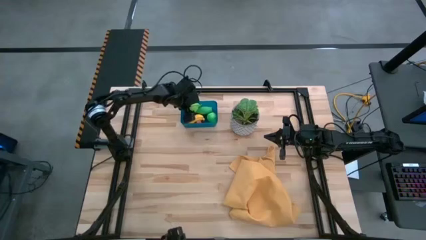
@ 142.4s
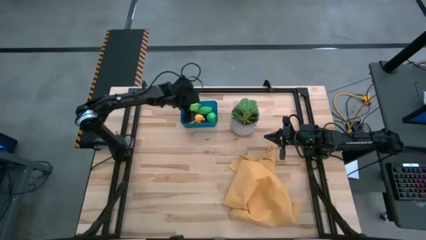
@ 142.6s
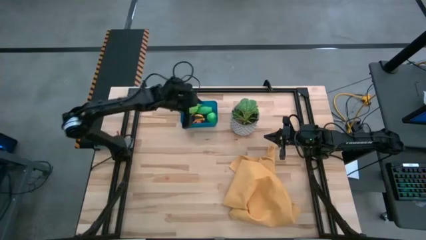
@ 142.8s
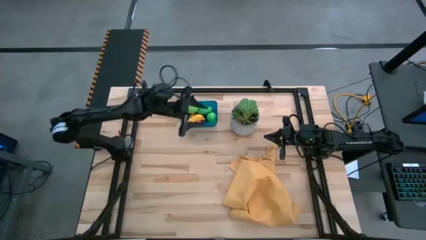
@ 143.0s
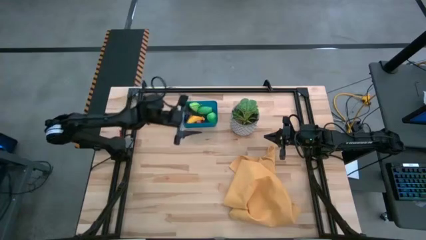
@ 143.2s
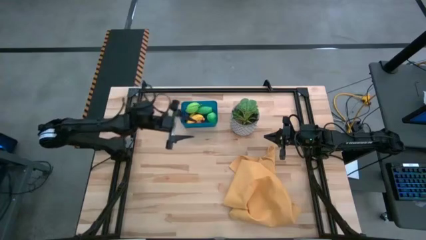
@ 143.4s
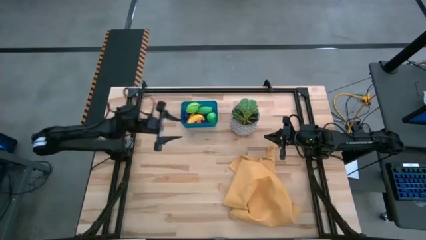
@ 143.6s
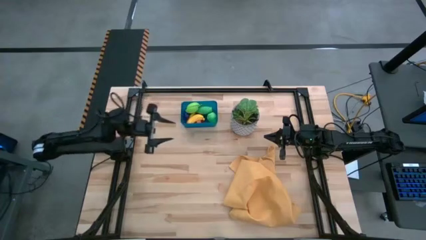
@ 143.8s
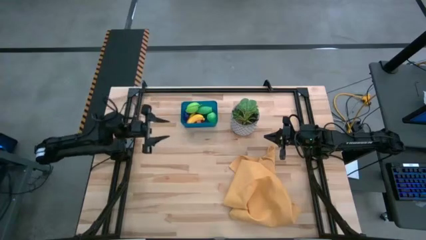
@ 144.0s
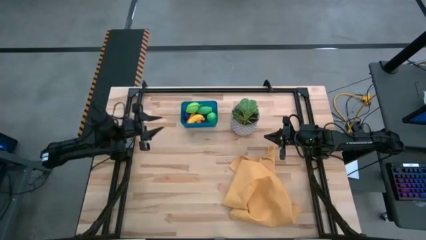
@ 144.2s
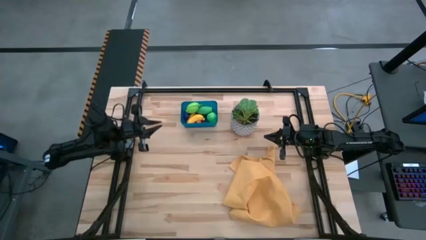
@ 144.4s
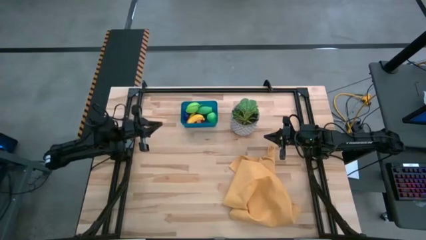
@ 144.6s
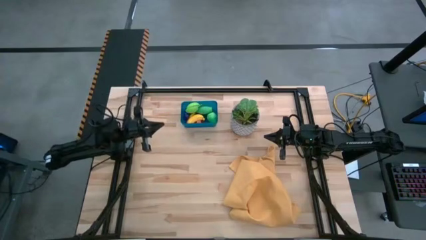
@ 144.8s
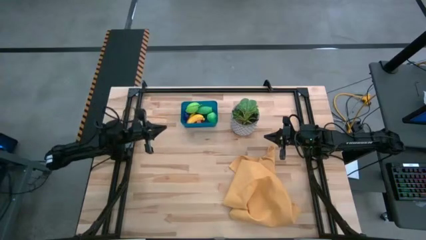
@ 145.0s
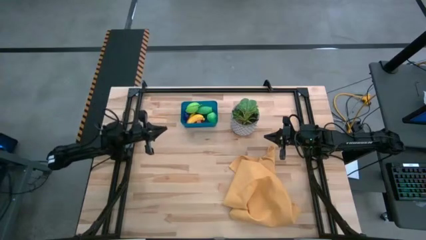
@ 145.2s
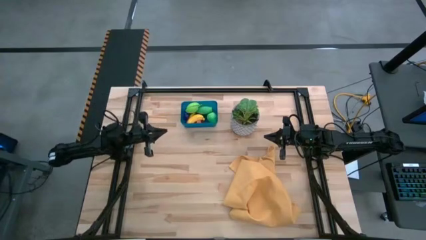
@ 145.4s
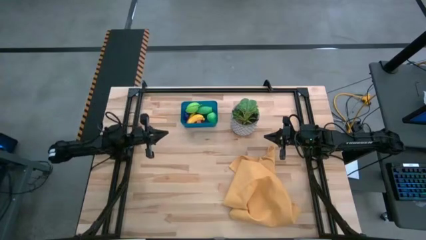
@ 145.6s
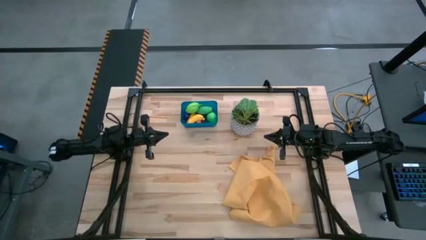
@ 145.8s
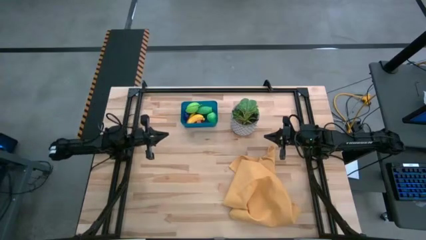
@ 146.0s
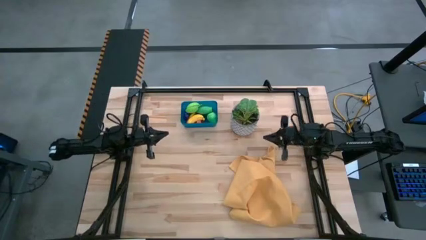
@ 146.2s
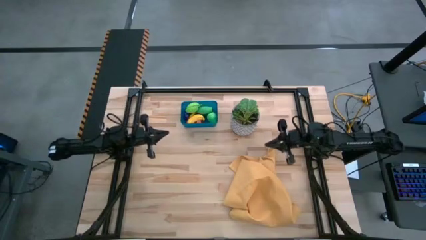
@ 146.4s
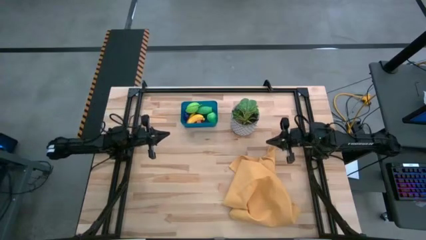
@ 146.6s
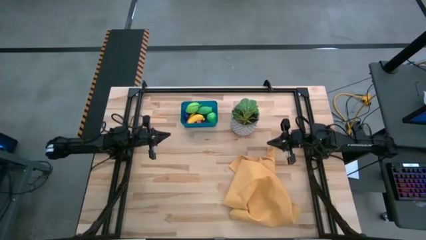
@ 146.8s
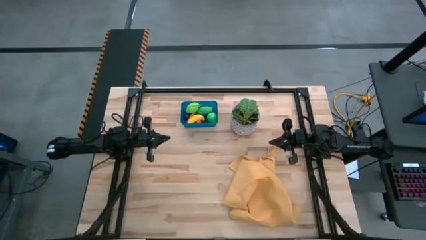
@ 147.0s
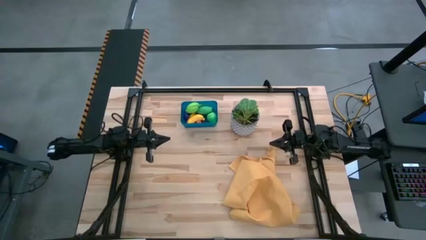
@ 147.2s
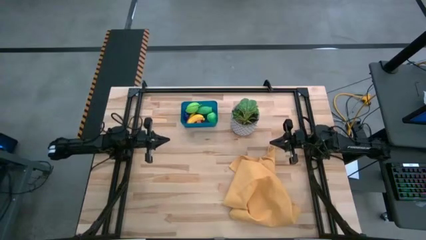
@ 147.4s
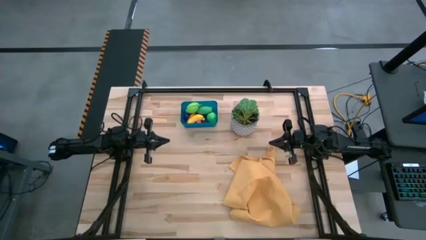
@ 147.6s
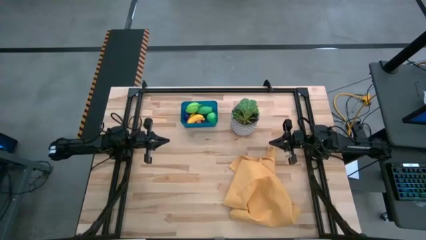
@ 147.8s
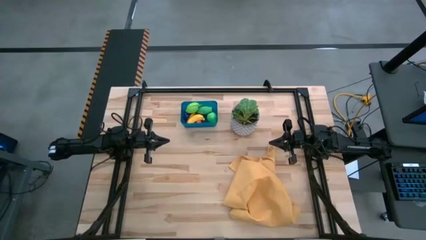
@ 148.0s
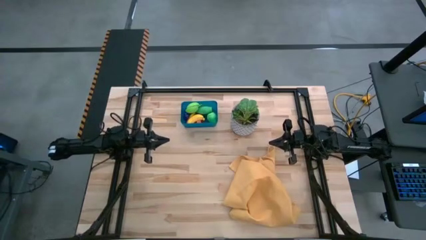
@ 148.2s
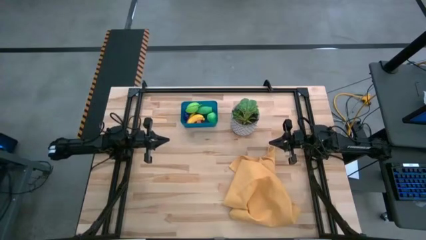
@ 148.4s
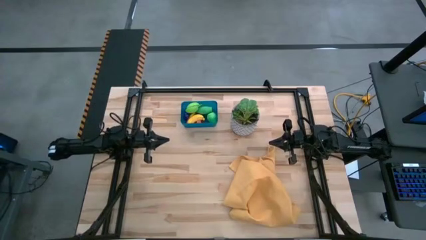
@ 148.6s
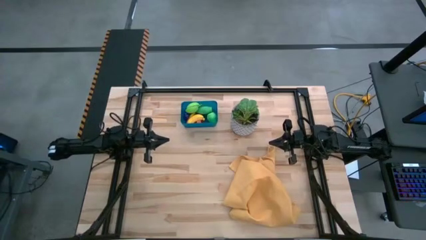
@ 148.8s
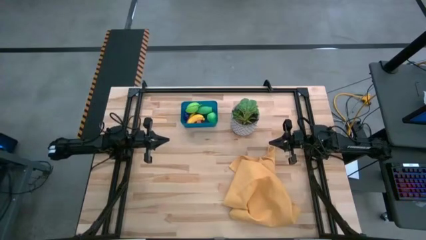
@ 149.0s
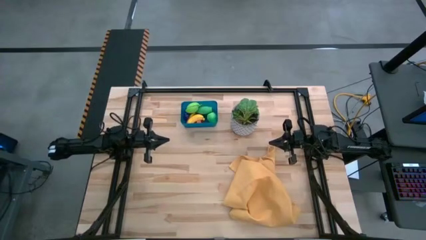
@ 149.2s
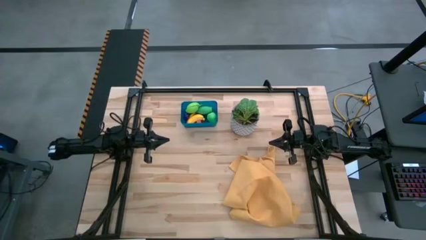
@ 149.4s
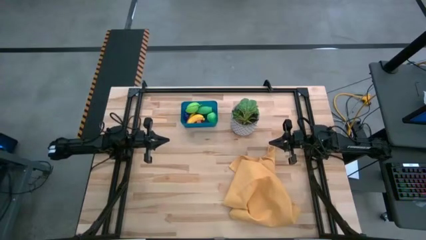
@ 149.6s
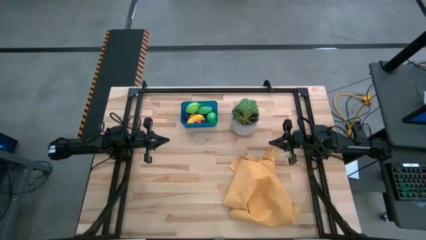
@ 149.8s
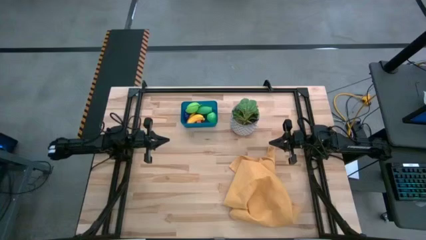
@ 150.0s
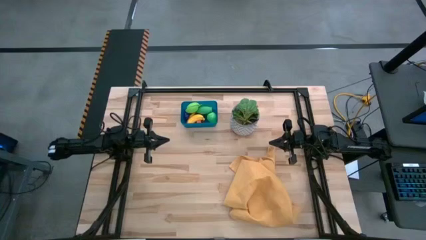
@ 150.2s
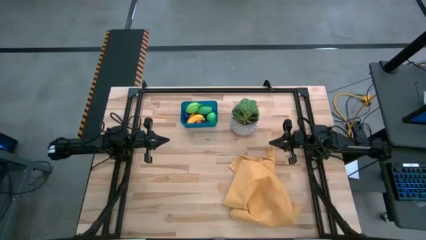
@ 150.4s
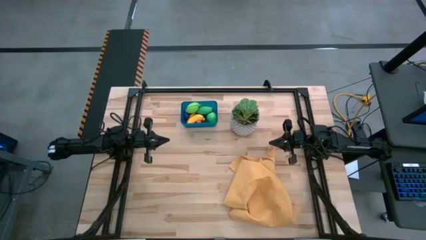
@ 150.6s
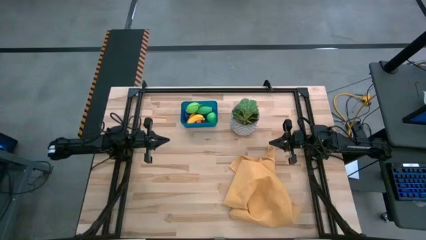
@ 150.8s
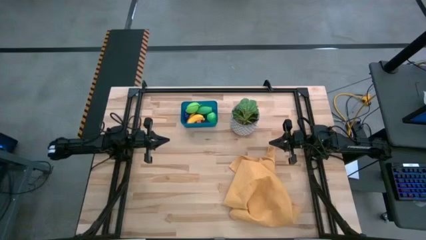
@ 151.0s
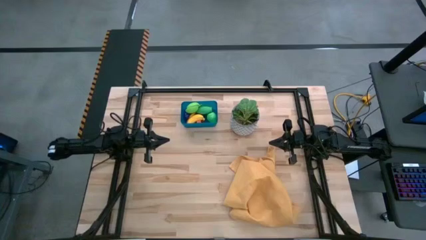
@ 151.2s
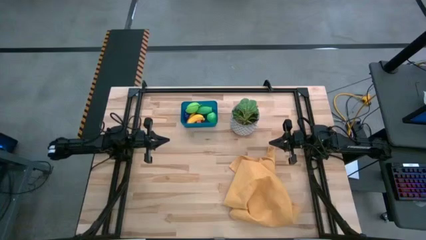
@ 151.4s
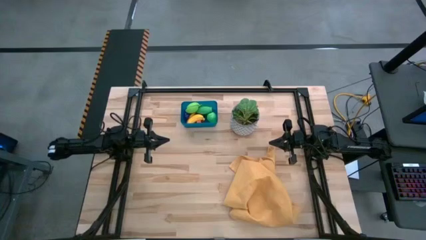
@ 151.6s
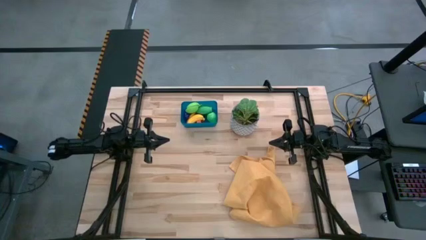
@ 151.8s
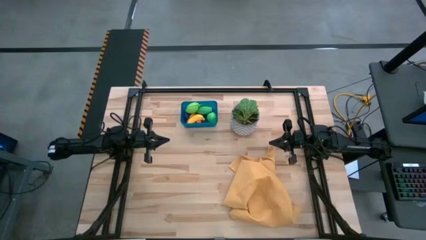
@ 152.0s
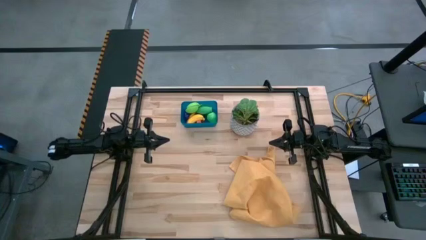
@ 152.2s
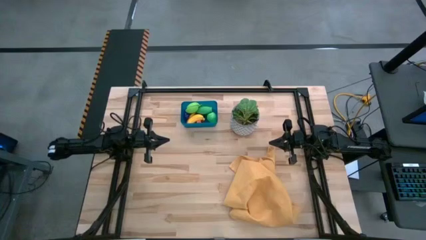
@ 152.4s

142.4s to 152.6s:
Task: Pick and placing Produce into tupperware
Return to Home Position

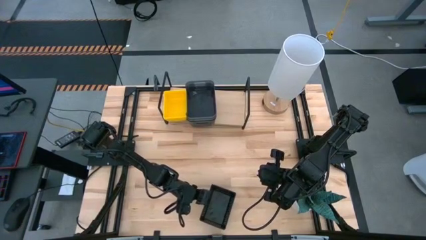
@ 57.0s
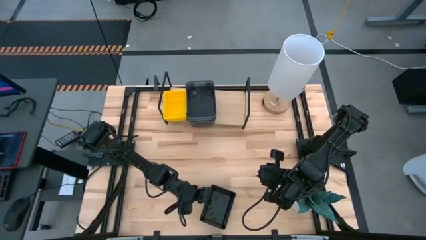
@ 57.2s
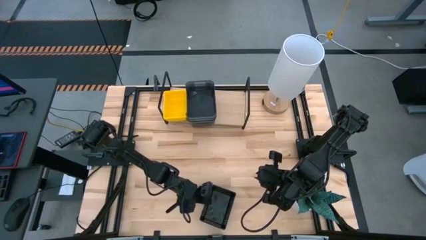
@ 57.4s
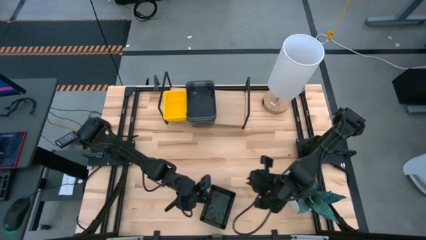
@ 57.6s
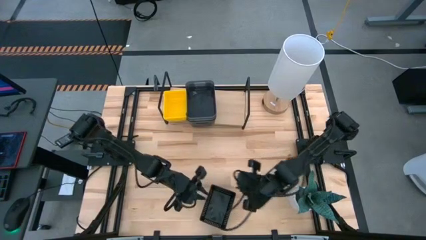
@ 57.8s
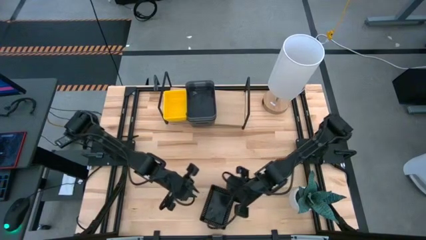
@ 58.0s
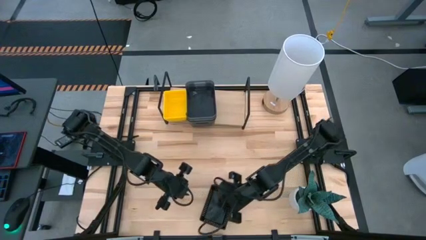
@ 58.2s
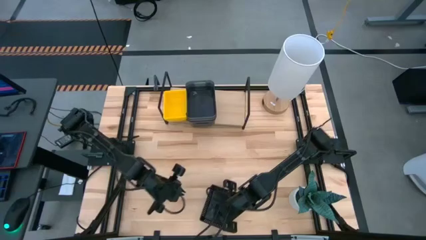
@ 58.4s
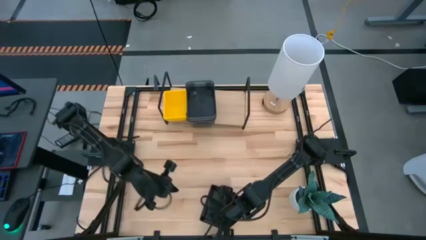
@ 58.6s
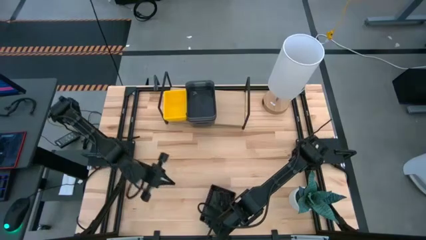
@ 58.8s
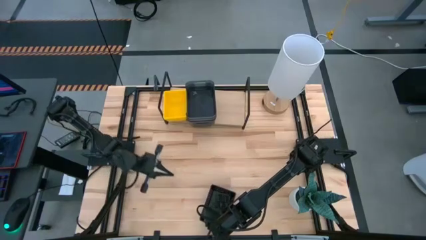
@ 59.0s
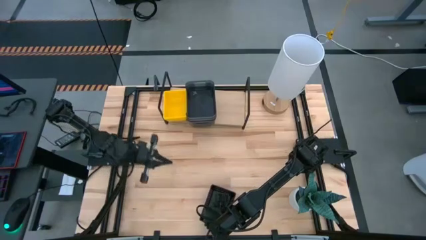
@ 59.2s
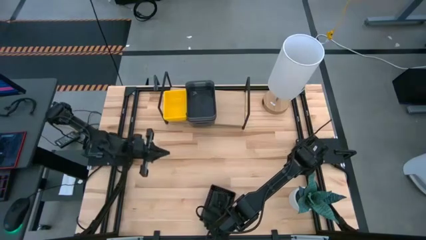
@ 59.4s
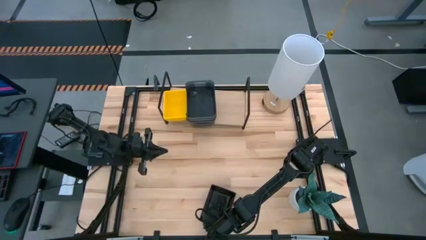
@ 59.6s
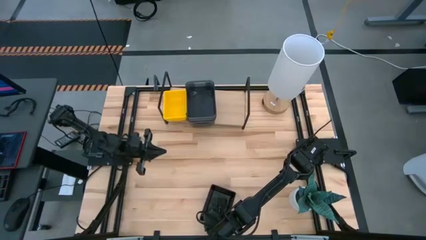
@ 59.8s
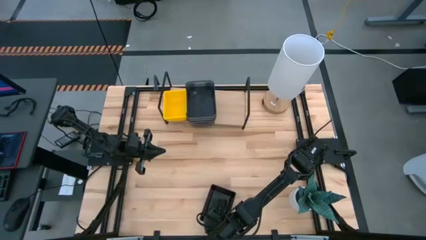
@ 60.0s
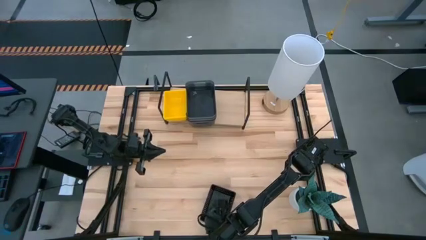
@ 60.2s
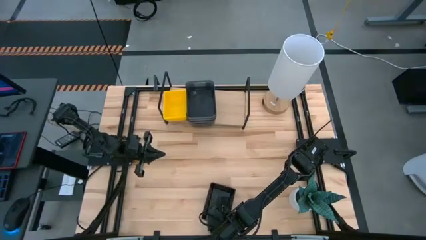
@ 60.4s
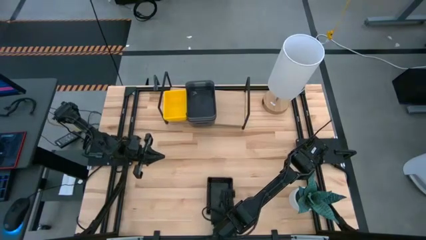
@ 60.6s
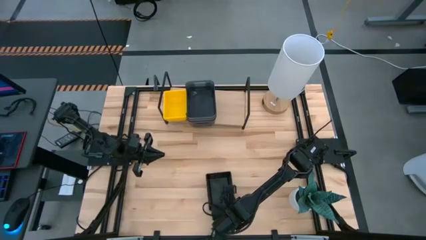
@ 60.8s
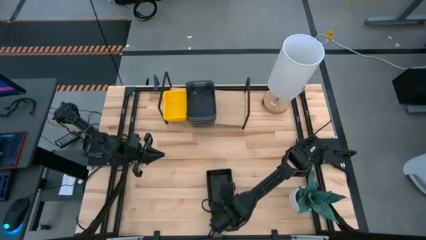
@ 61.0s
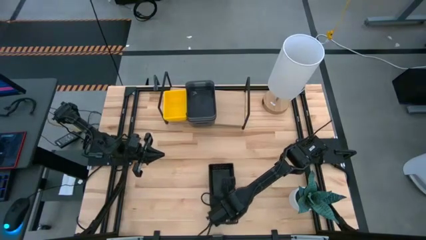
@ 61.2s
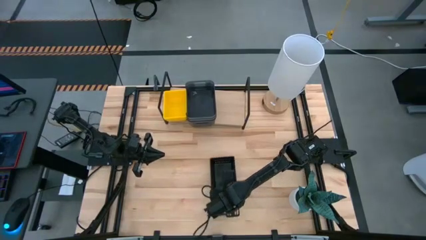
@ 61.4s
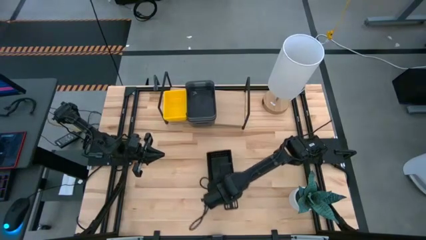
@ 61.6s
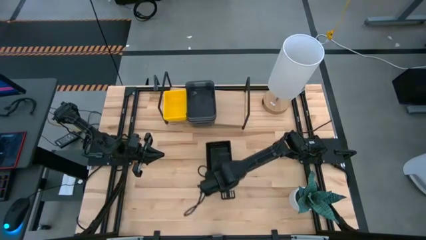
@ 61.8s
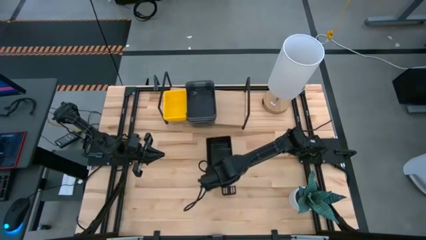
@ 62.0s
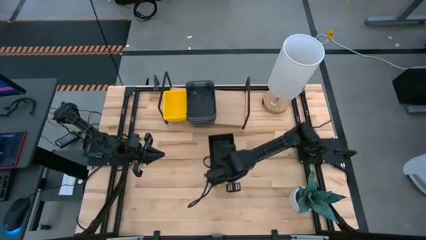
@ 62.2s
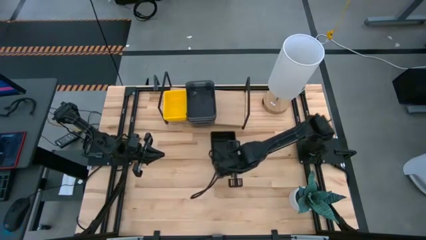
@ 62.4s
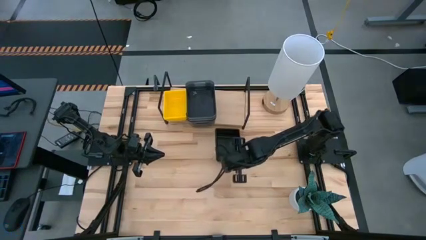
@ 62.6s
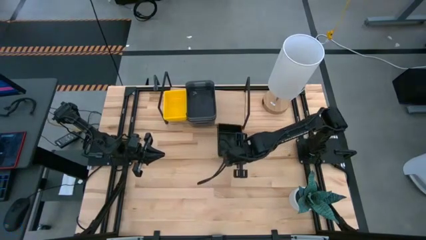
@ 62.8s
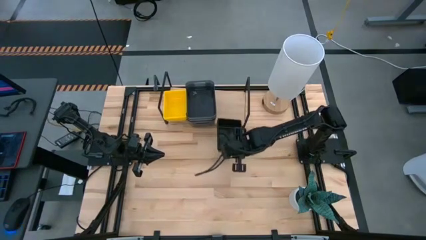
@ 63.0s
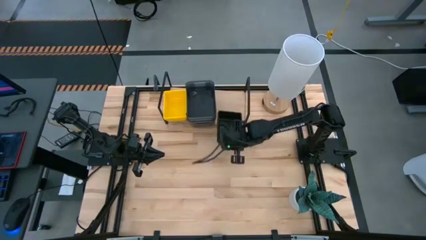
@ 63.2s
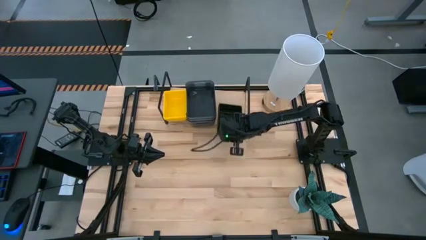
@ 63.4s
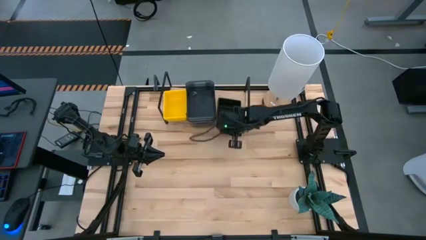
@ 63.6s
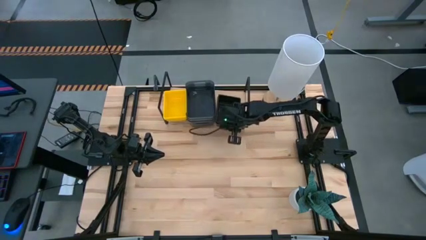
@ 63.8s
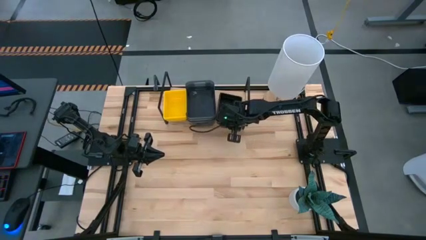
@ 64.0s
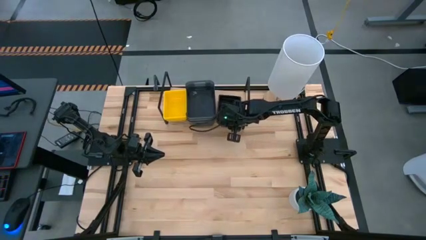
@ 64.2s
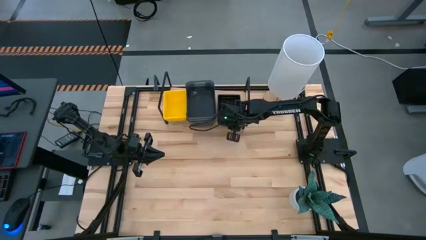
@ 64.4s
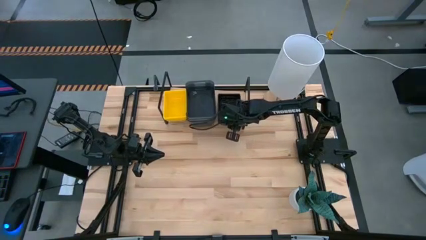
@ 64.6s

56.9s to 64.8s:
Task: Stack baskets on shelf by color
Put the stack of black bins on the shelf
